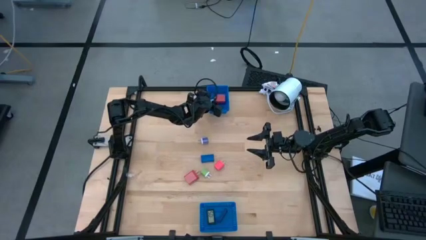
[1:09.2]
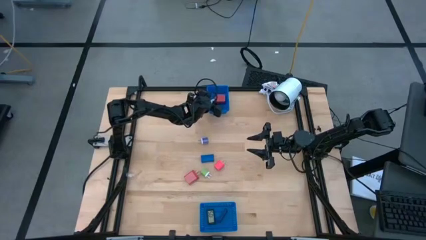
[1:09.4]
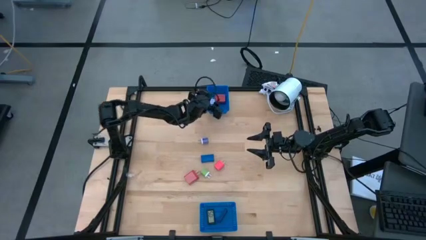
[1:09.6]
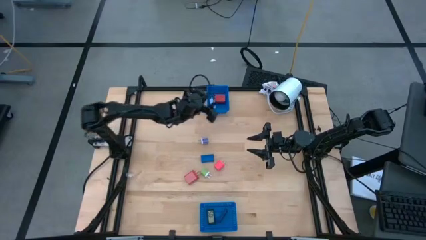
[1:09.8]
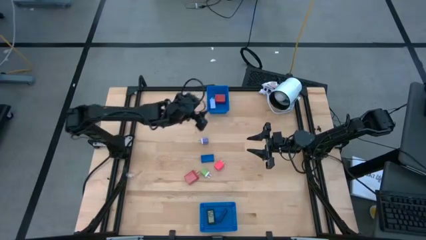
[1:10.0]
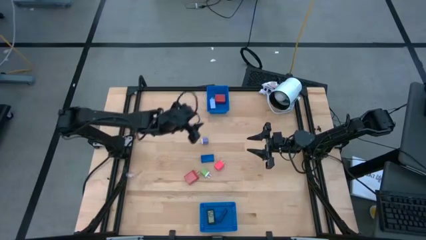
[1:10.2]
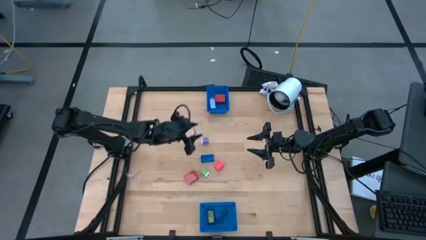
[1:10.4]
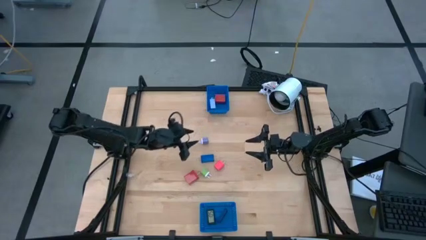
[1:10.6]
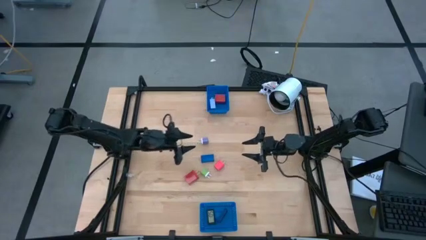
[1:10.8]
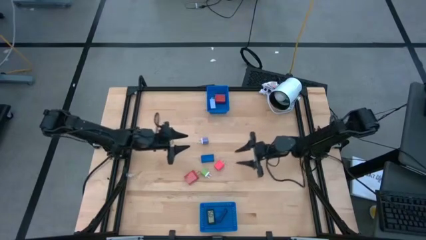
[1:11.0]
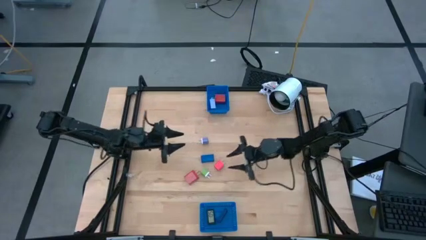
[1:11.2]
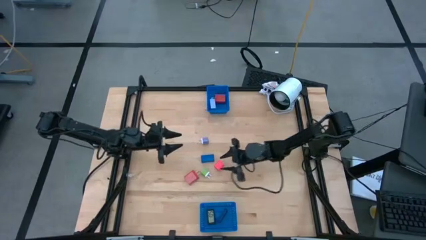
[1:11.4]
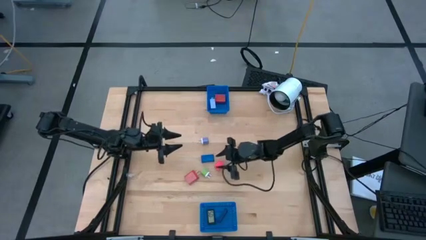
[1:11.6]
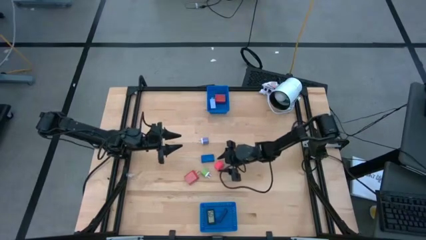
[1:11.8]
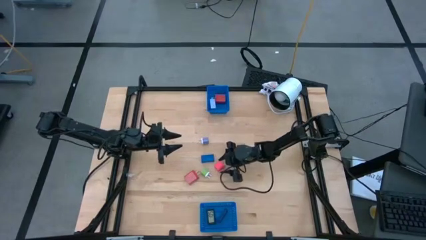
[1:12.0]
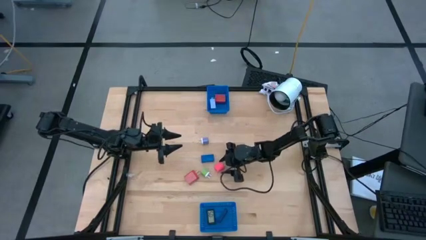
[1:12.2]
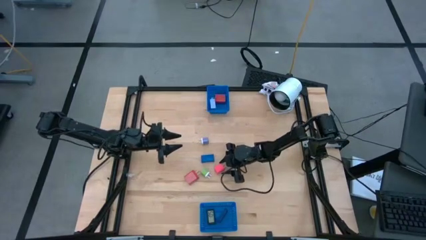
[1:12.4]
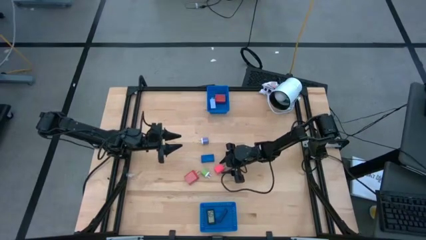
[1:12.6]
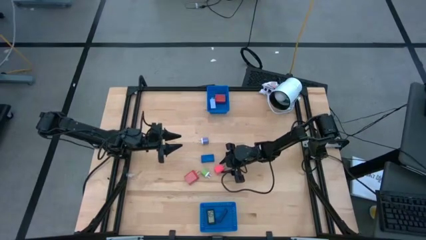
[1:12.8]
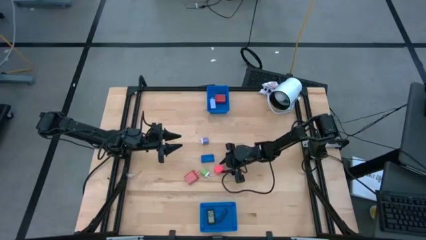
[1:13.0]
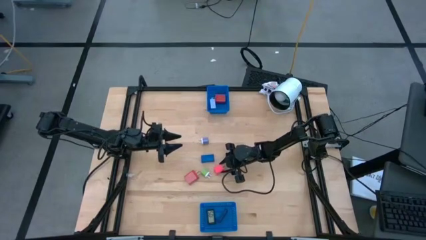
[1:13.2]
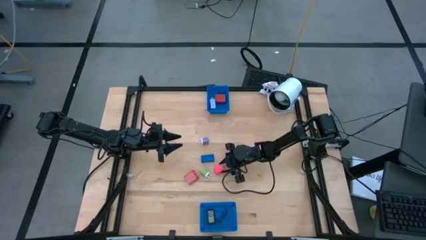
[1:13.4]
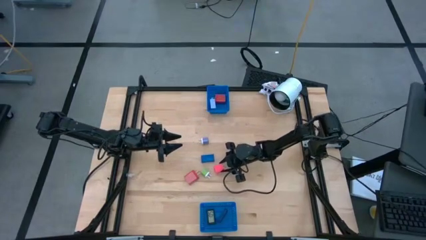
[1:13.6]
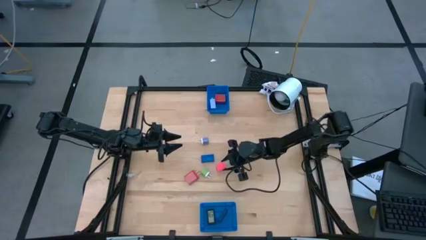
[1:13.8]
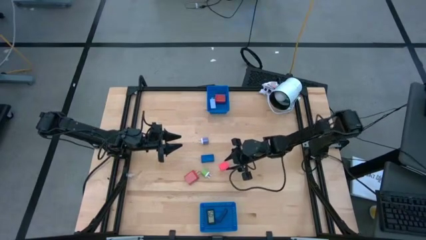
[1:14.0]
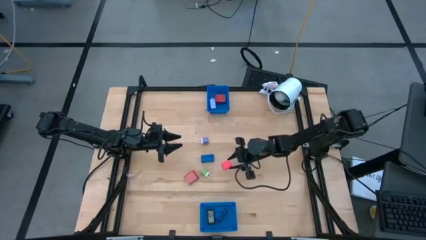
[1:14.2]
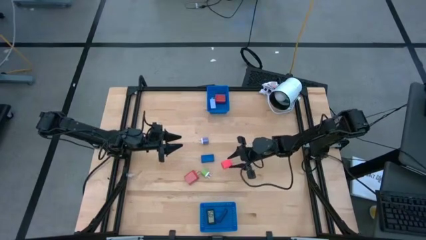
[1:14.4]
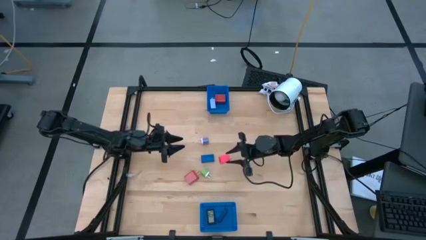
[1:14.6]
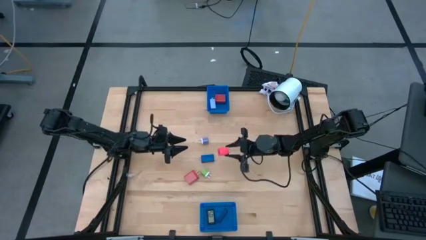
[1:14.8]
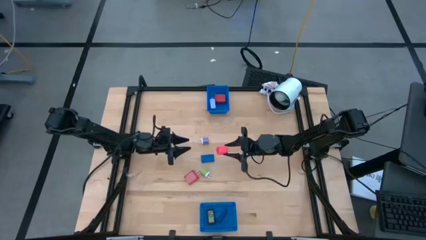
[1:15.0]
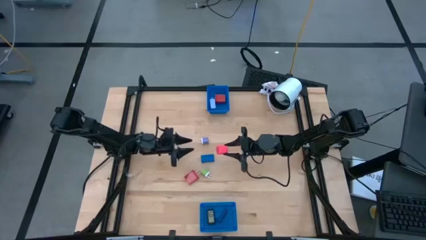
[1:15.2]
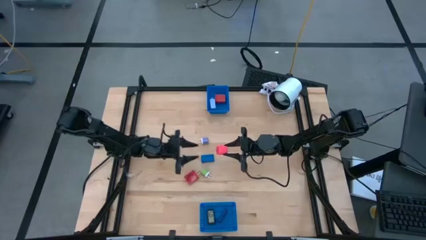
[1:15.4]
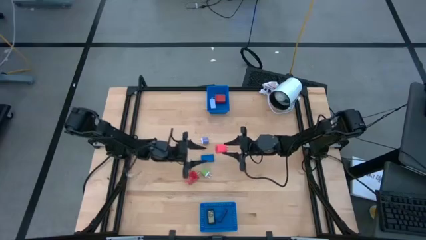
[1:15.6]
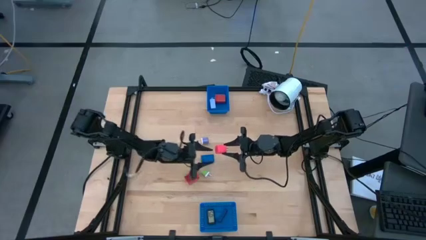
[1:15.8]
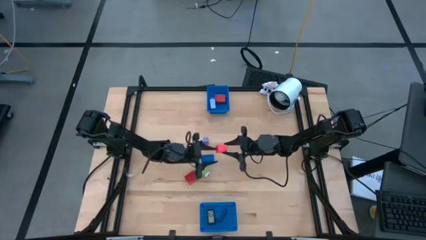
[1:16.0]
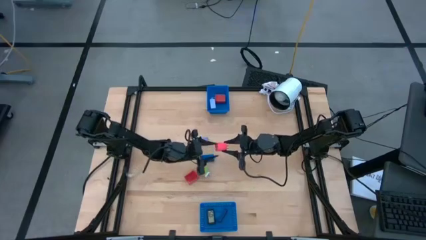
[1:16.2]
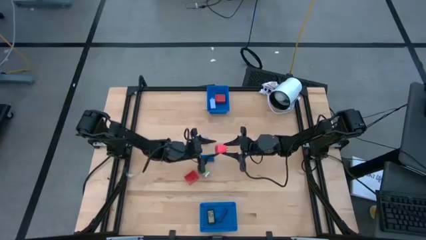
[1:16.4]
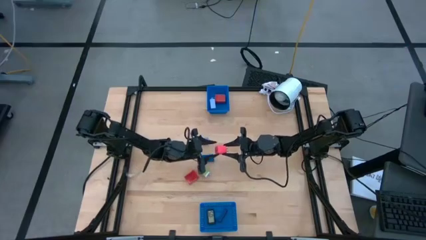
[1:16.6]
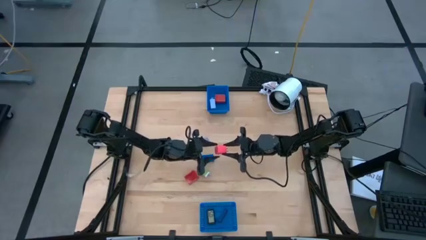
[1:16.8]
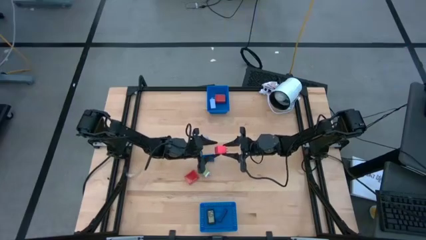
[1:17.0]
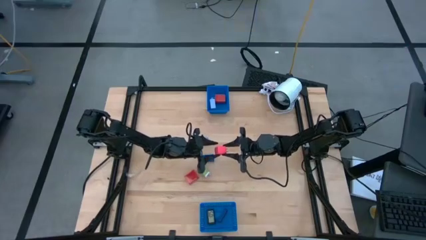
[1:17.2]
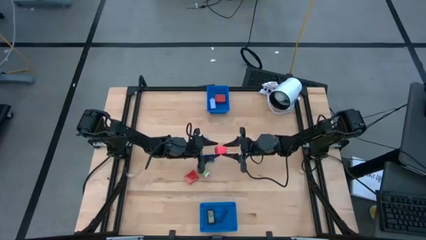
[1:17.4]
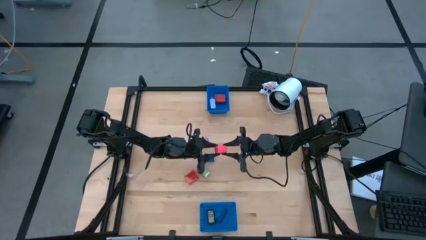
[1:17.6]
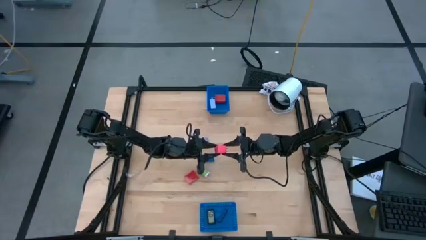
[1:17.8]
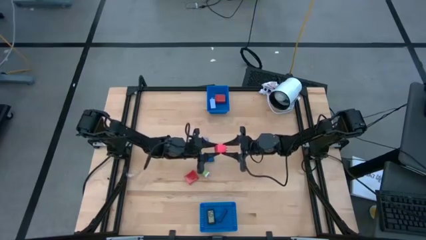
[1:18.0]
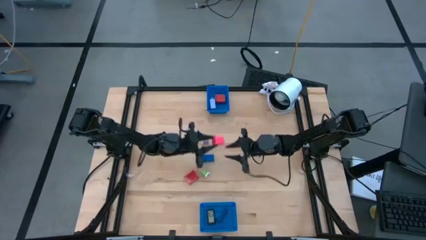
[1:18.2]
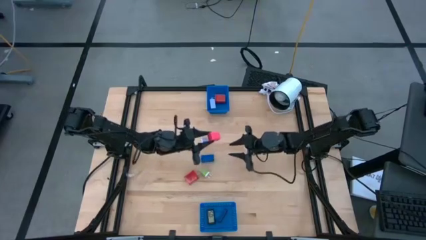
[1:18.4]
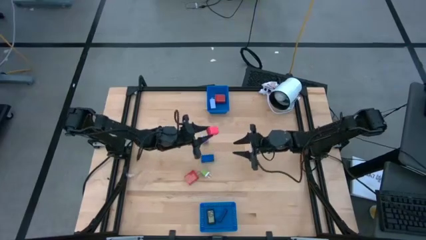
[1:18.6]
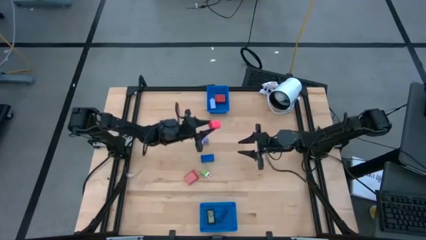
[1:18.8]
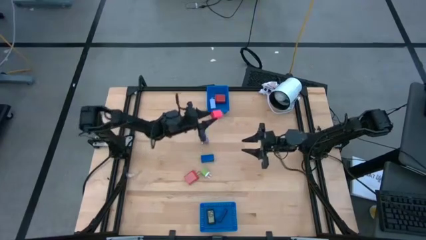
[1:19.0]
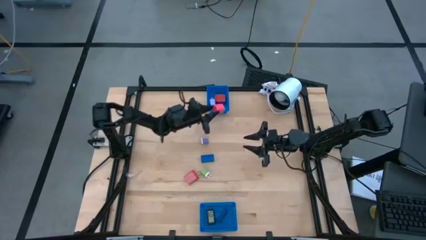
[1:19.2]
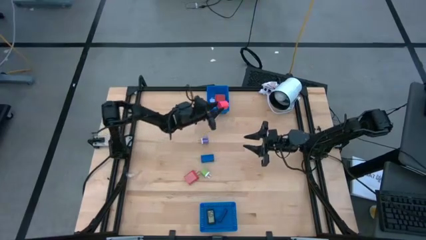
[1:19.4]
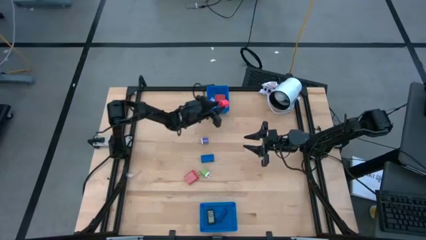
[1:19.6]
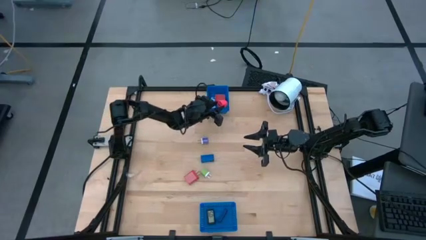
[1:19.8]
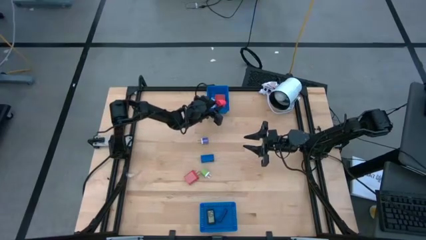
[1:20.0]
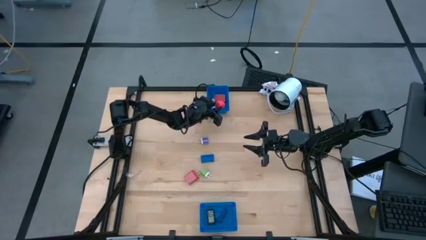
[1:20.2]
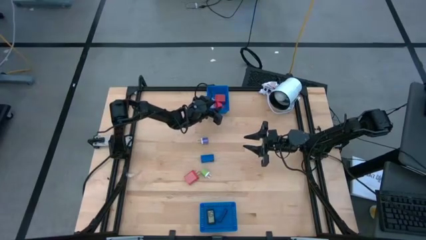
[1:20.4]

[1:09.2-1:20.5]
Task: Pick & Place Office items
Put the pink charger adapter into the top blue bin
